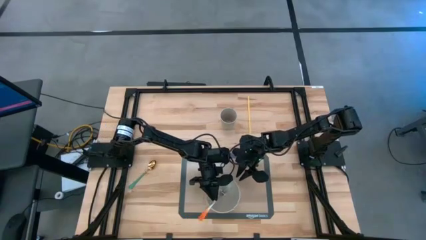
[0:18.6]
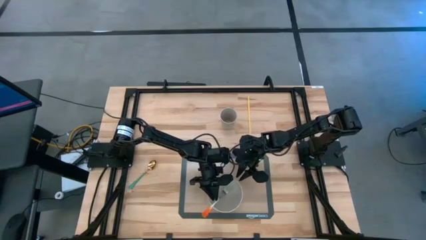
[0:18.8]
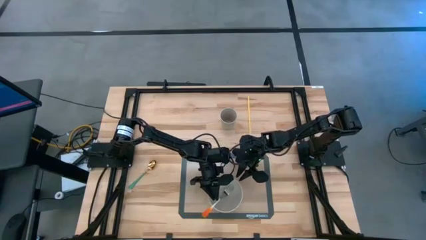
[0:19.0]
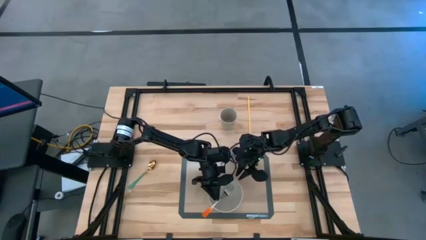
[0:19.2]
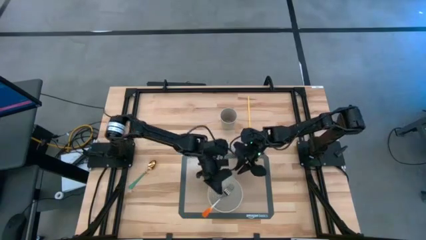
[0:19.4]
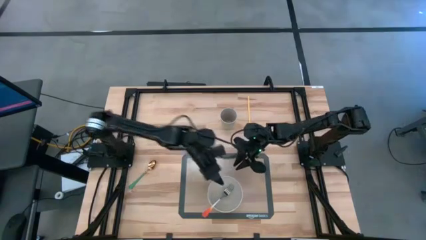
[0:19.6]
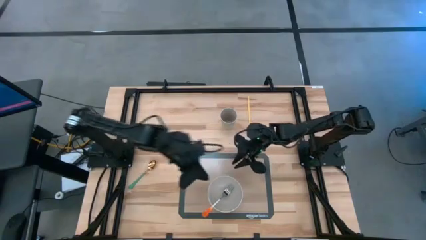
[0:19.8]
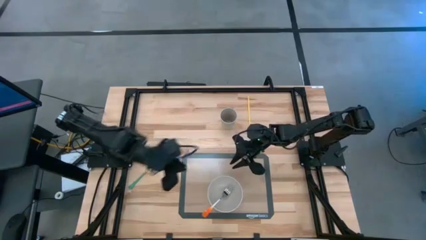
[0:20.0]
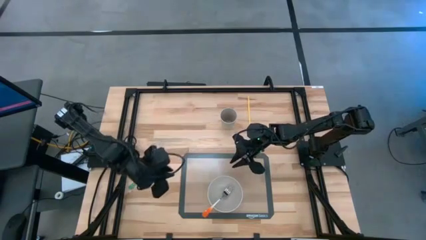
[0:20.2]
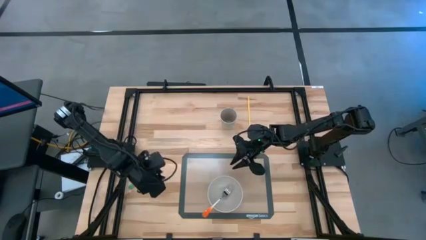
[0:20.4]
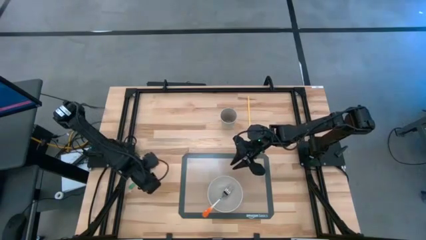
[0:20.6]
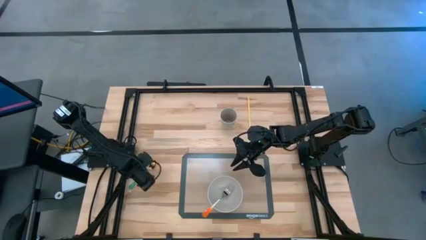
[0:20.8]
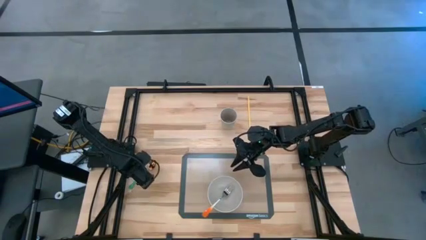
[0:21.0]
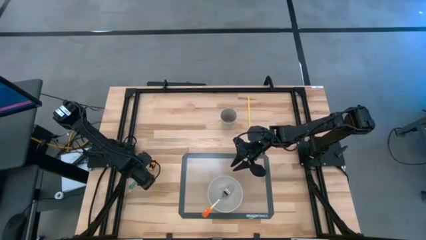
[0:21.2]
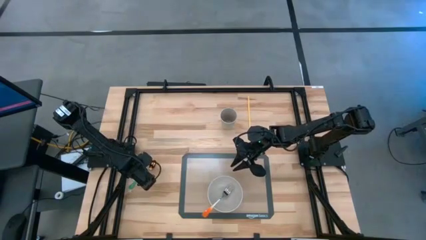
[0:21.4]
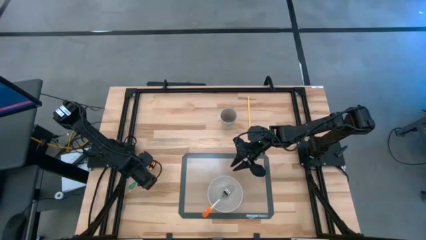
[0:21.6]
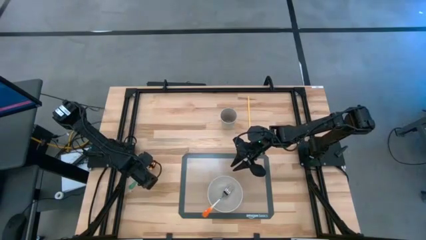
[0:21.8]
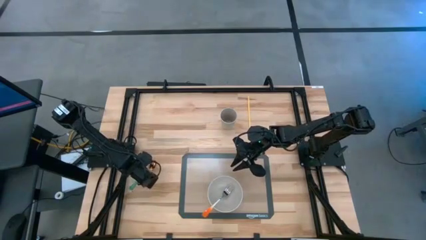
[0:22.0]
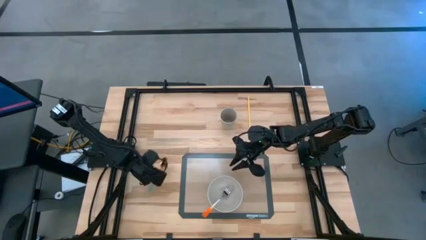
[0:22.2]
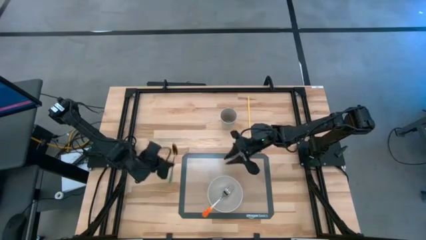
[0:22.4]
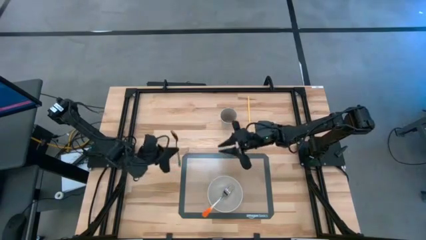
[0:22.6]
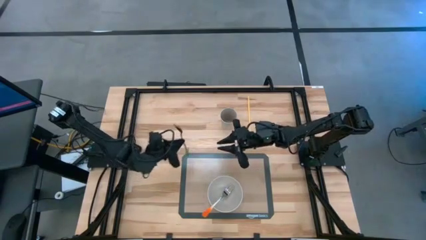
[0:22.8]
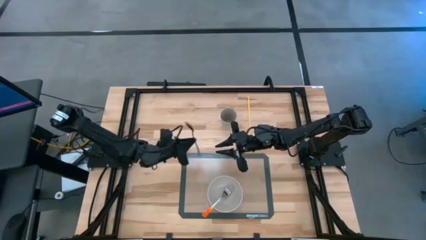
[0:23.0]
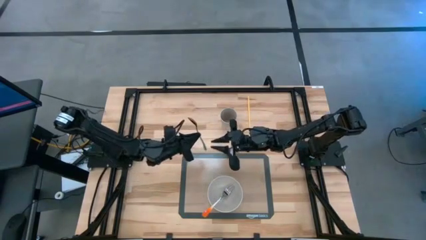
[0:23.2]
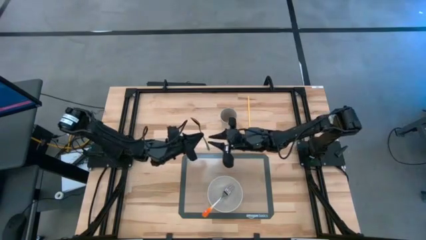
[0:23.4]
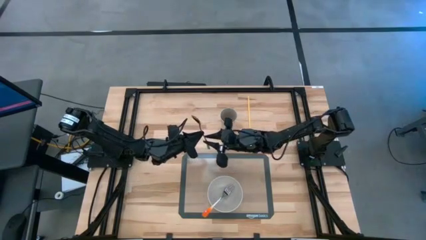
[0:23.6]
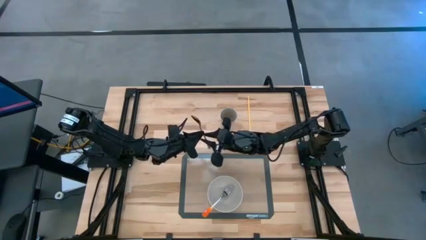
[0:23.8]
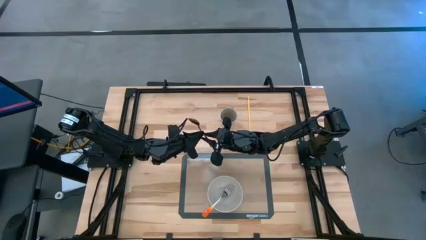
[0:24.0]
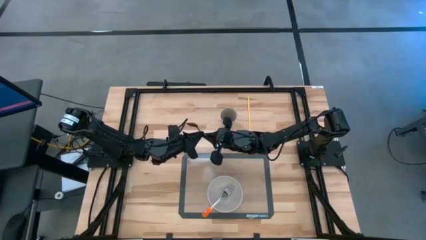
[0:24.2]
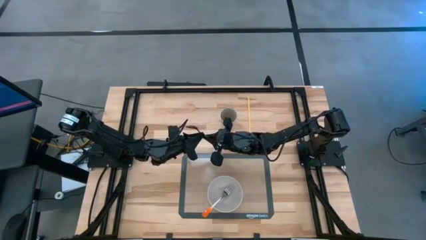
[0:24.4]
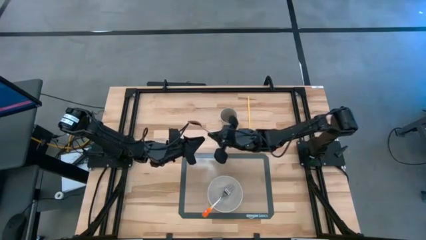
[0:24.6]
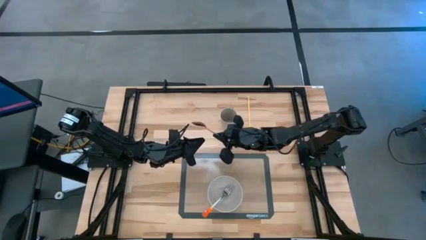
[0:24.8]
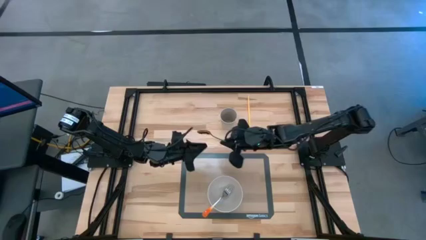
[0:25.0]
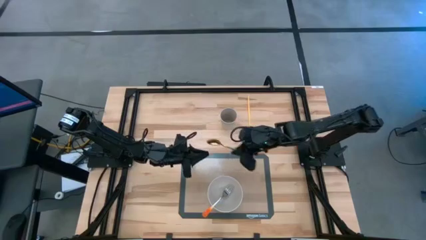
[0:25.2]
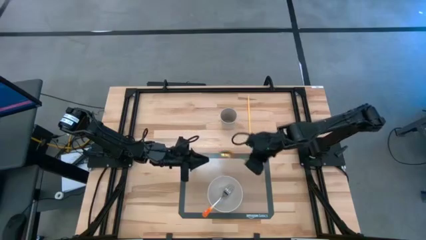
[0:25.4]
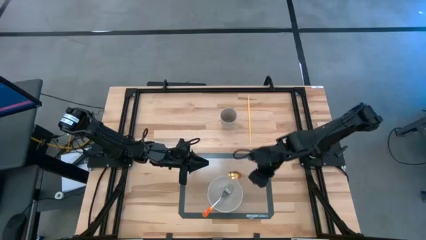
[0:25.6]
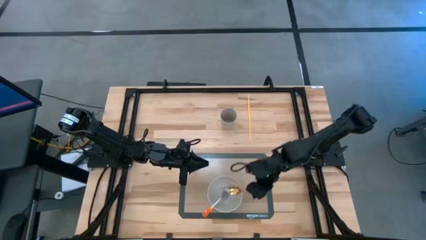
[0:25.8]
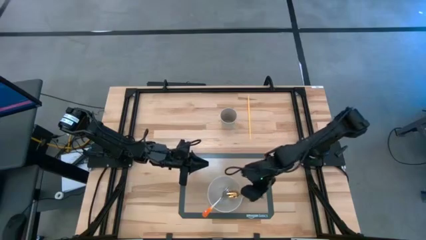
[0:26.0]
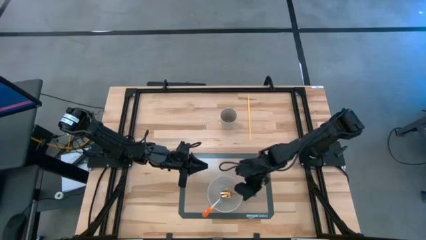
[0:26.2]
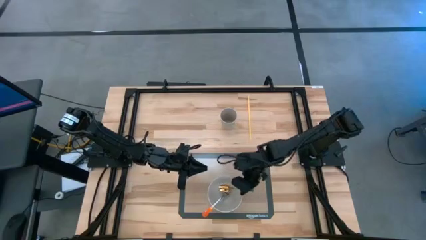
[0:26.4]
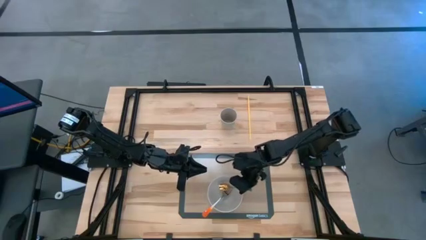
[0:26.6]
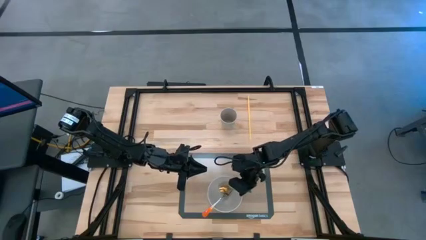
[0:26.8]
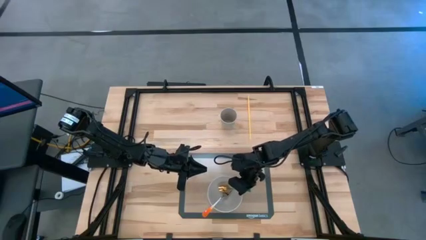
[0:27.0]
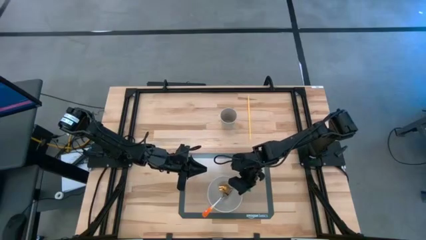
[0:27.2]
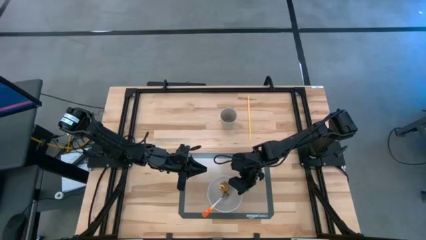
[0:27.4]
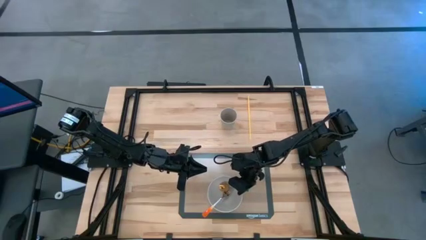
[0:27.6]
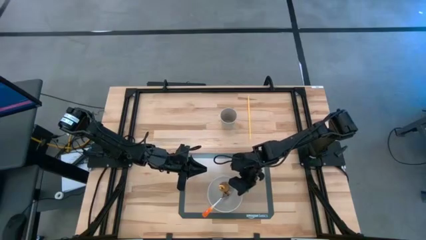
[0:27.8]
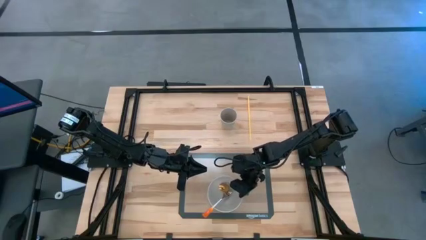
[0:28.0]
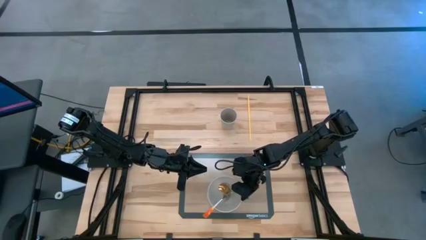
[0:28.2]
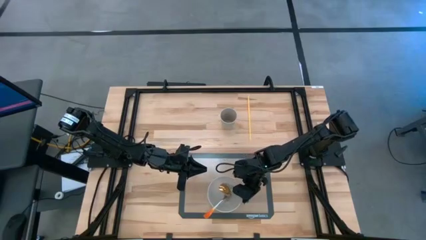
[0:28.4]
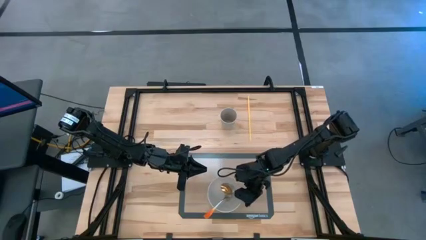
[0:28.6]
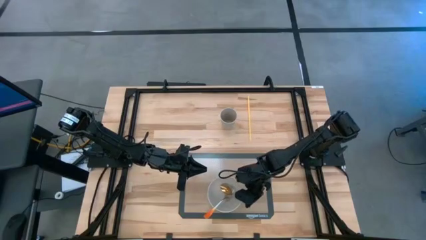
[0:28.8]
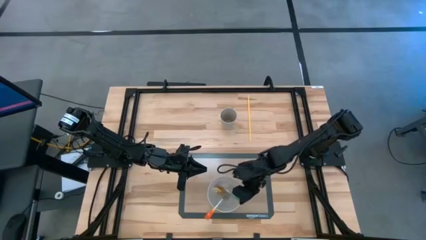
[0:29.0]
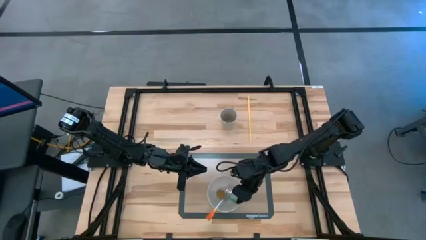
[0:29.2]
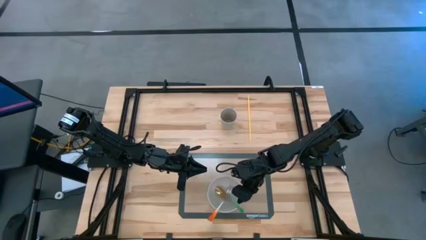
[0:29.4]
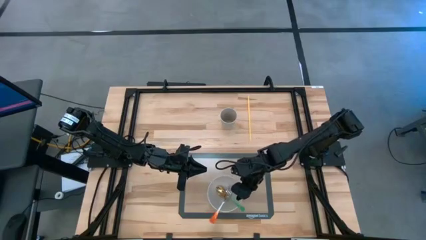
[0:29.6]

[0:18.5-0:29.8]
Task: Pick & Place Utensil
Put the green spoon into the gray bowl on the brown mat

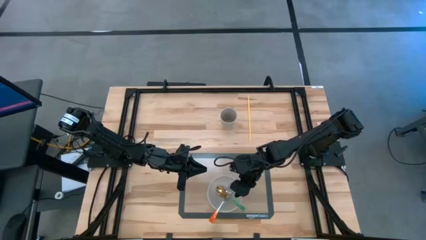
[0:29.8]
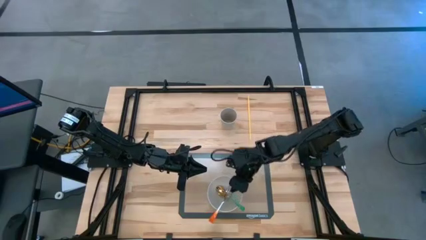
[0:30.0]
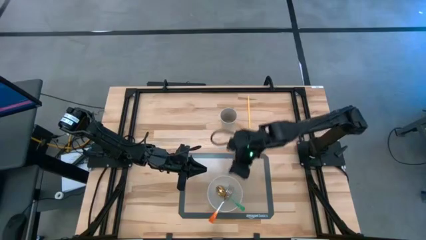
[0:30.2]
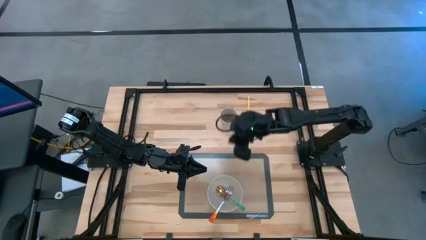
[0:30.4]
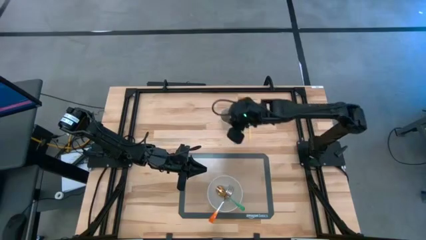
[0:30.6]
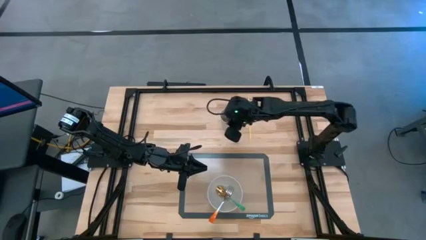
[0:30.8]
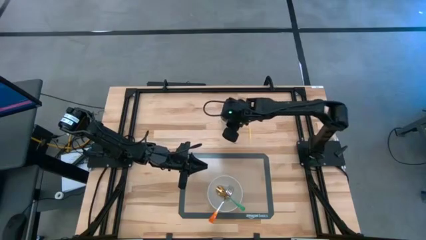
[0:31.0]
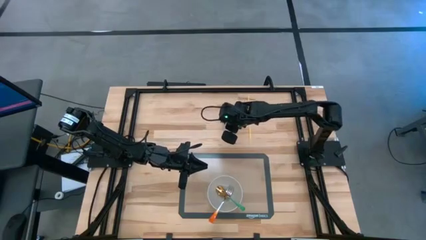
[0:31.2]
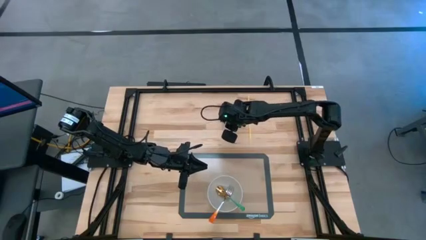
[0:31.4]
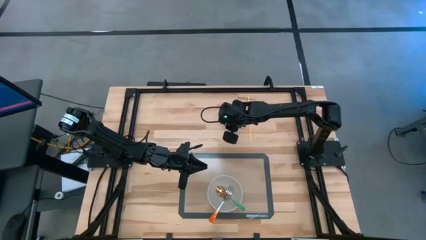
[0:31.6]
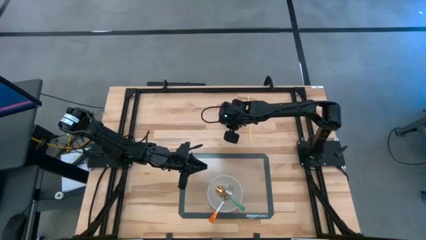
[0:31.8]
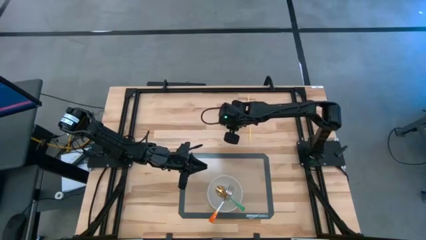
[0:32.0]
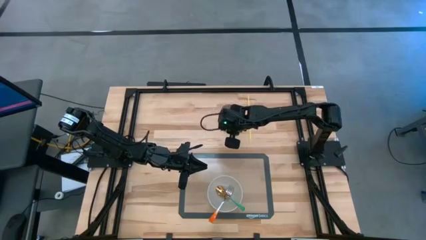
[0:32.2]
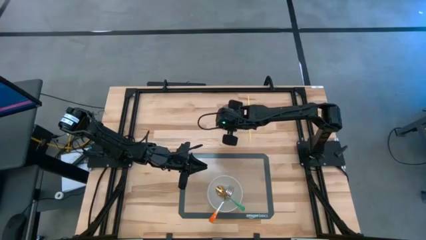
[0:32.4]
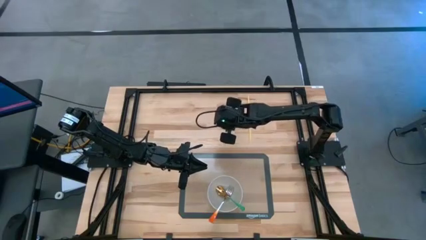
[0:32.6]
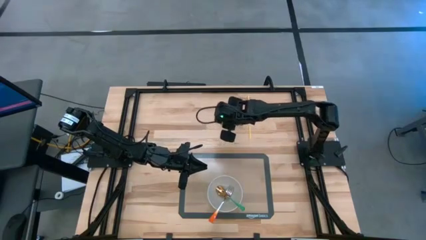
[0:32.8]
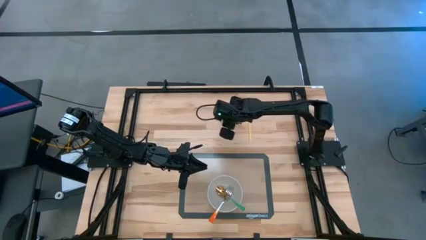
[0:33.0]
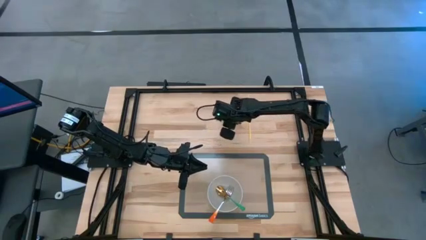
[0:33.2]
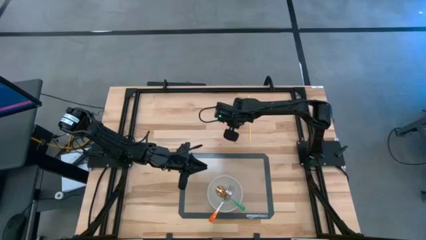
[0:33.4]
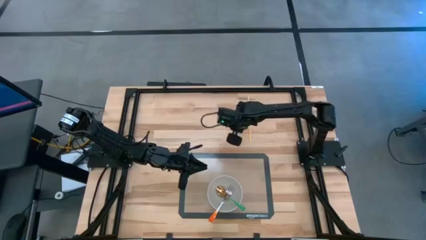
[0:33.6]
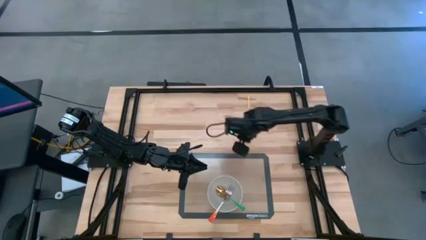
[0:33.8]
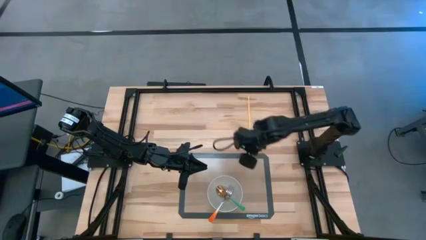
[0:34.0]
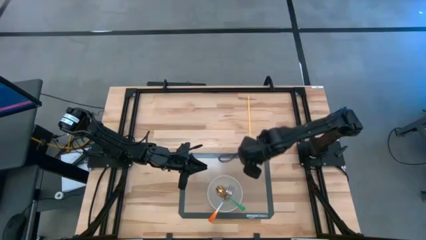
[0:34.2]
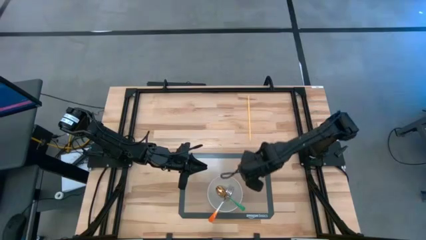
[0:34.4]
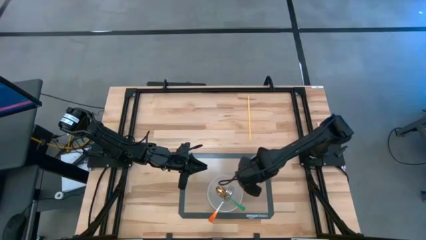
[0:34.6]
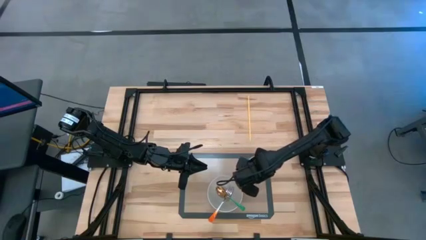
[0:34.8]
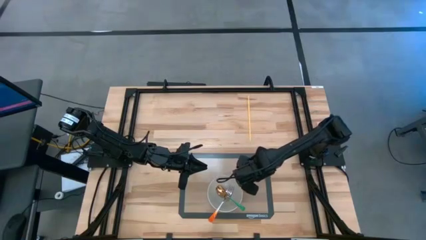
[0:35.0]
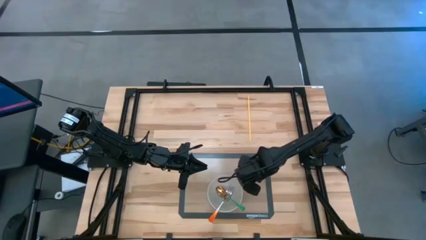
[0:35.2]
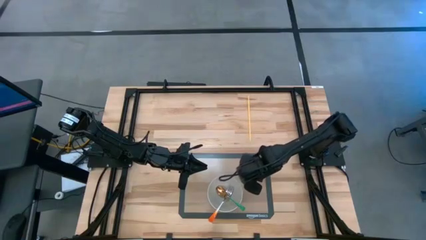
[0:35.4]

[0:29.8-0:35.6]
Put the gray cup to the top right of the gray bowl on the brown mat
